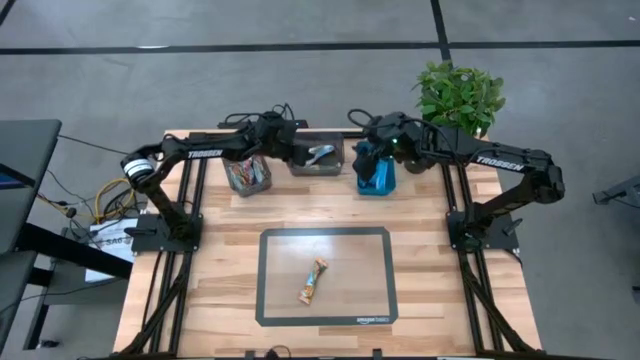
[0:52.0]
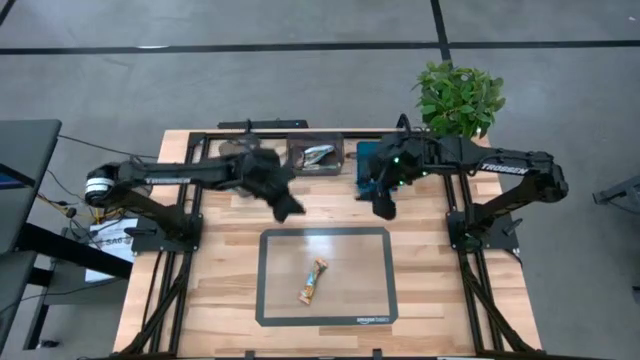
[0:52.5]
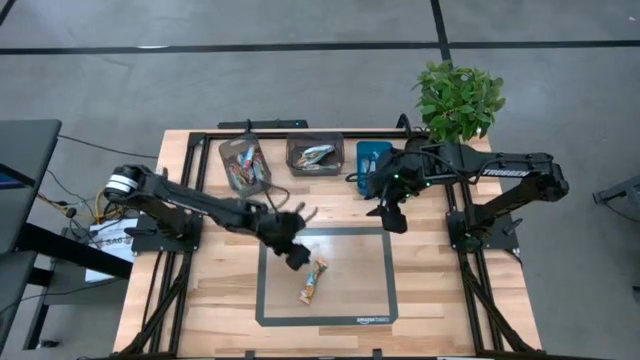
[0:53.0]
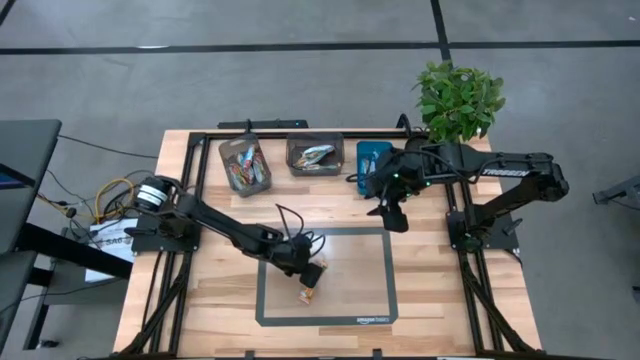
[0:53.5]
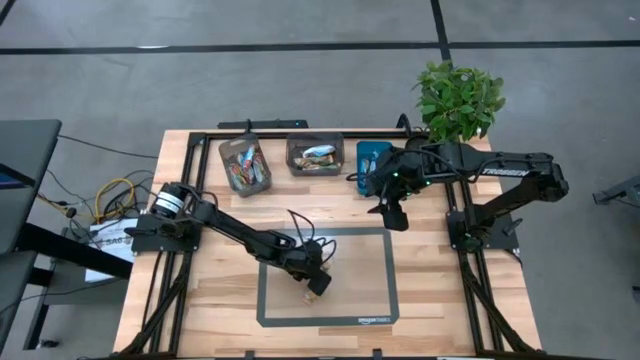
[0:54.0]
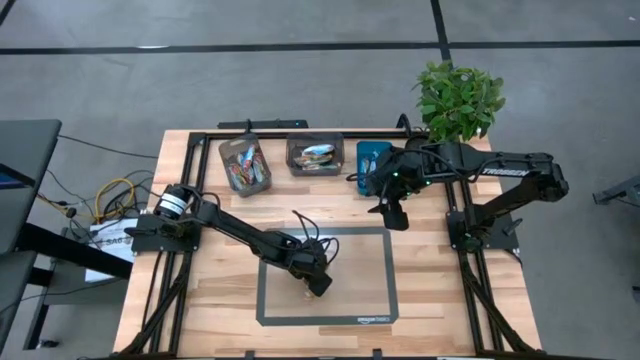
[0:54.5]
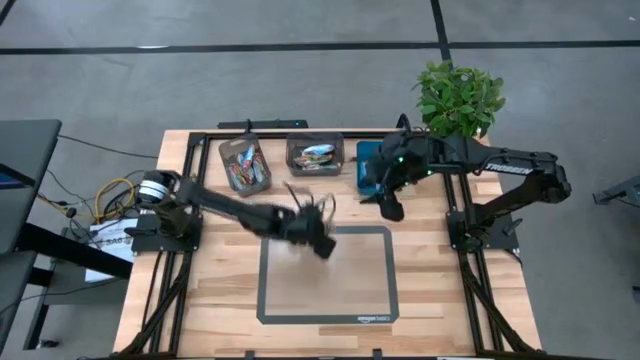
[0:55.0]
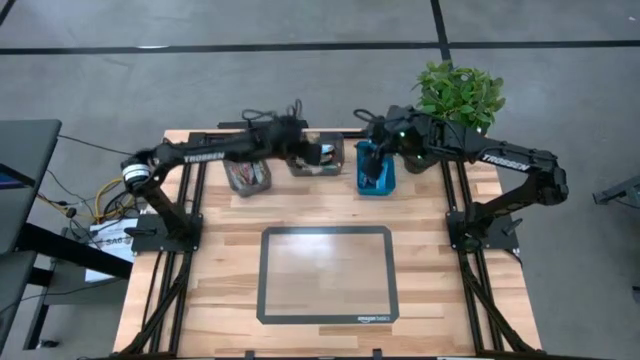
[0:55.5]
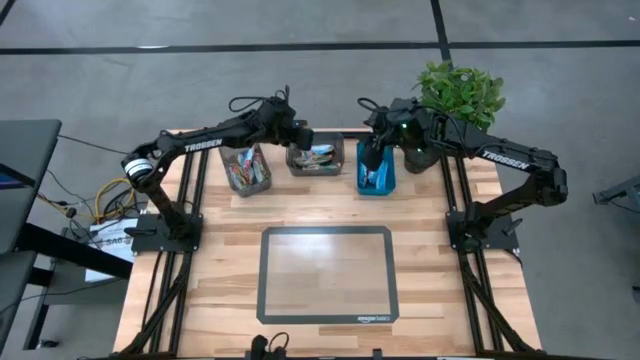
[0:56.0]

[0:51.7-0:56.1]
Task: Pick and place Granola Bars by type
Put the yellow granola bar into the right black bin

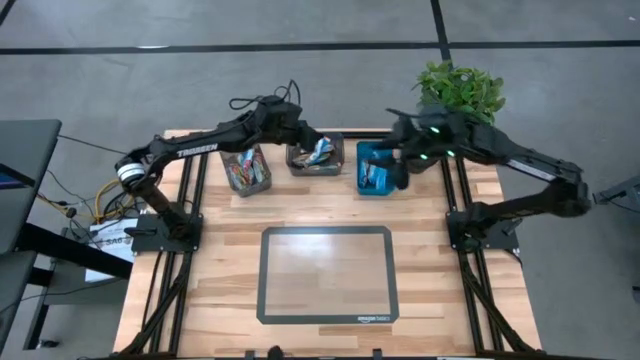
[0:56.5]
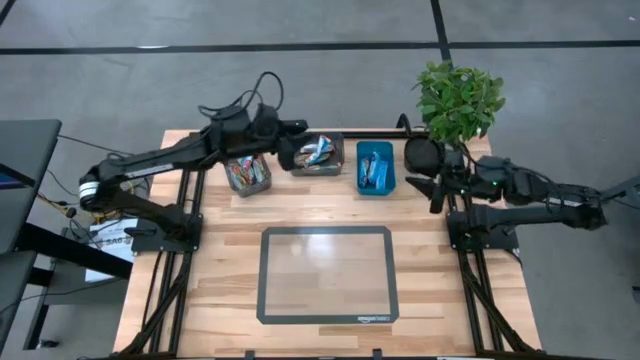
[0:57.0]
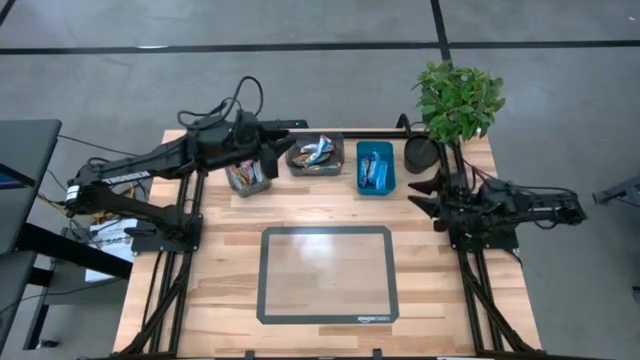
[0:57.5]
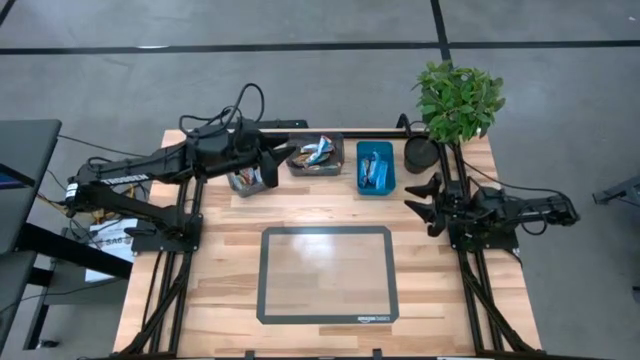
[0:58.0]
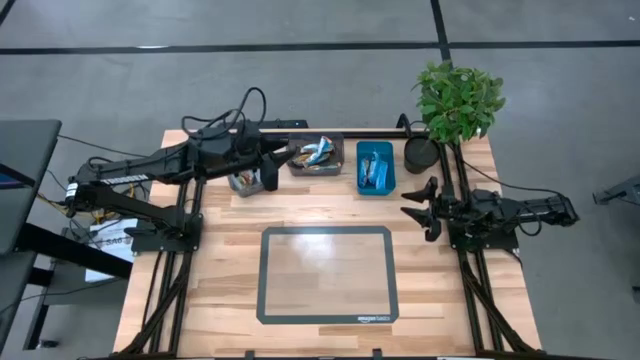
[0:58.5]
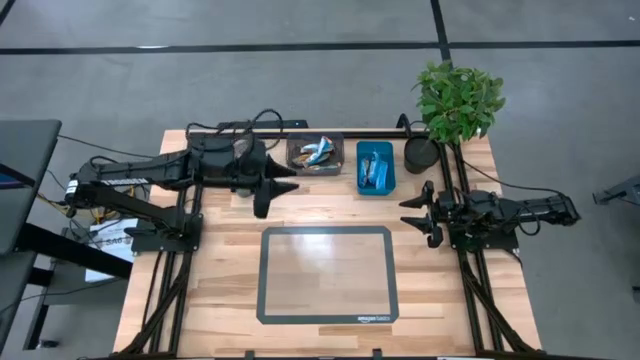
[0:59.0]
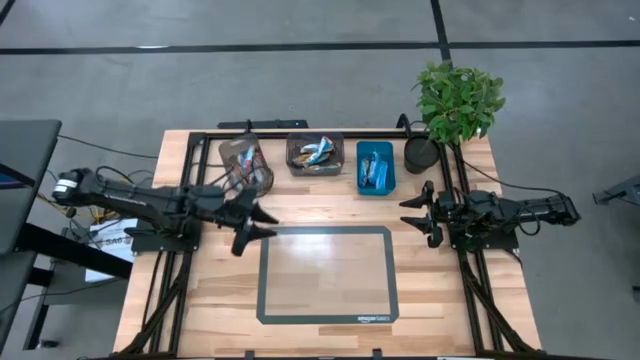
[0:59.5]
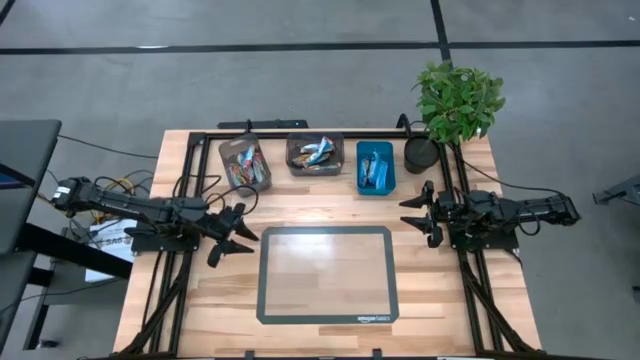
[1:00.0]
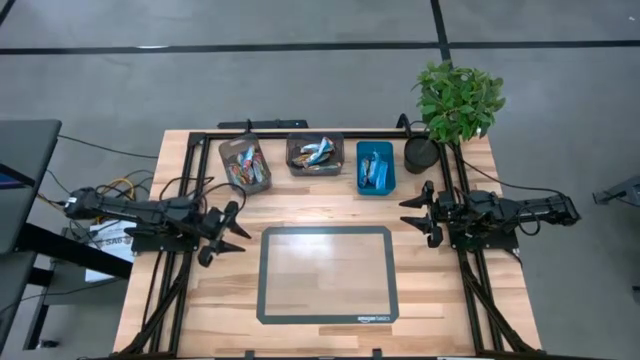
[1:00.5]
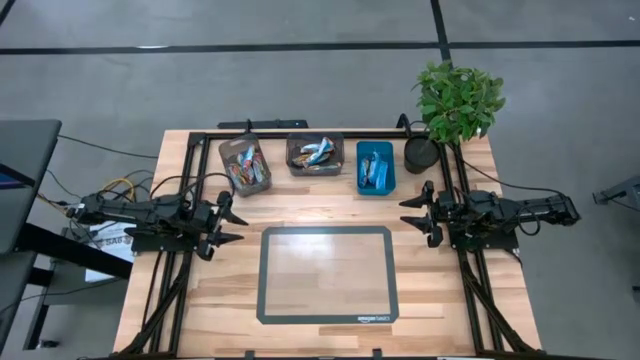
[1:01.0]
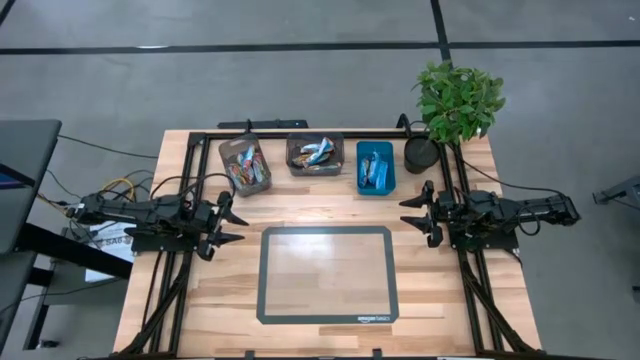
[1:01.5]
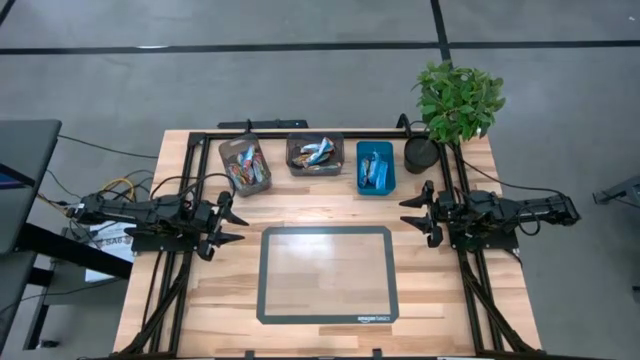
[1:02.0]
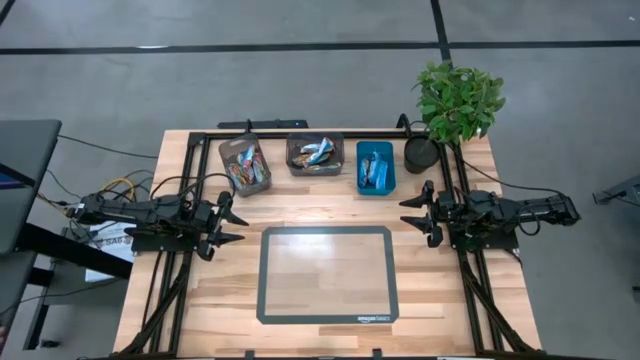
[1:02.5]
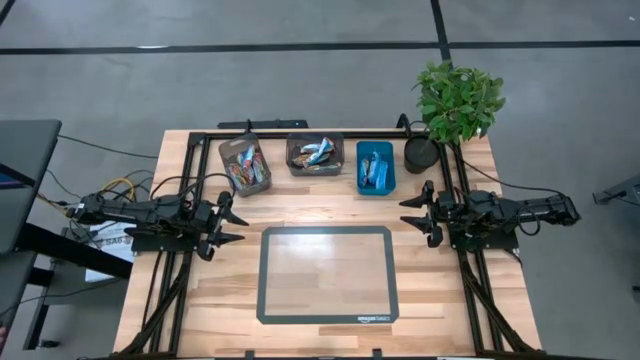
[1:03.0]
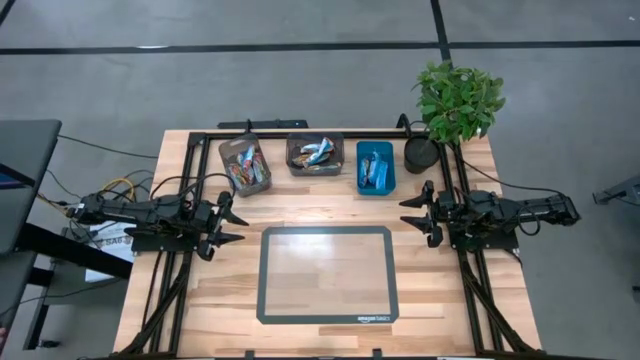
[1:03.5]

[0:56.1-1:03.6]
Return to Home Position

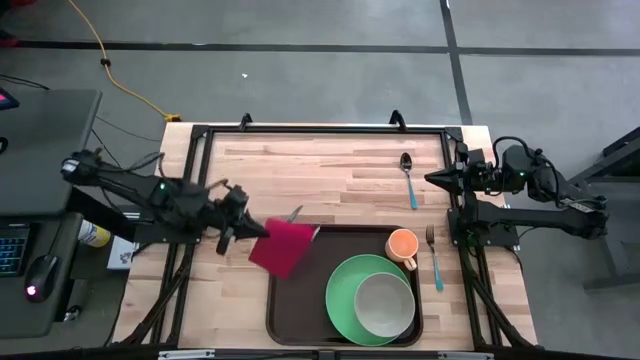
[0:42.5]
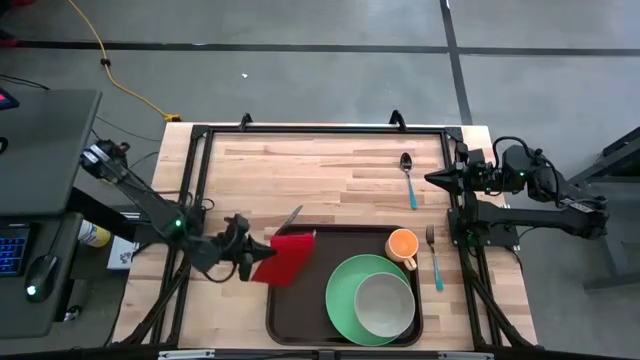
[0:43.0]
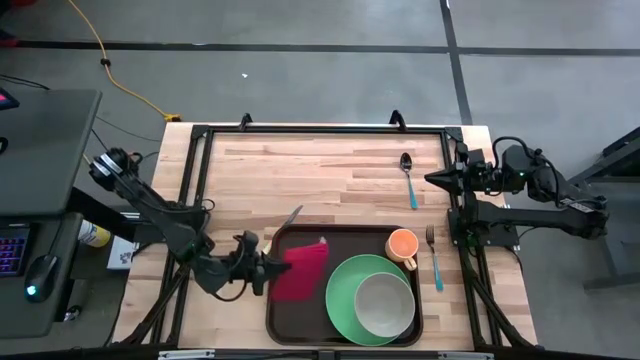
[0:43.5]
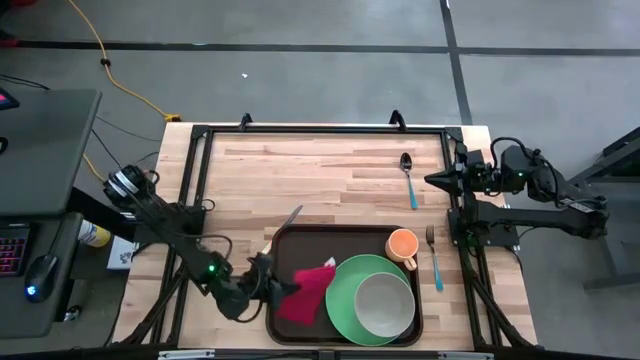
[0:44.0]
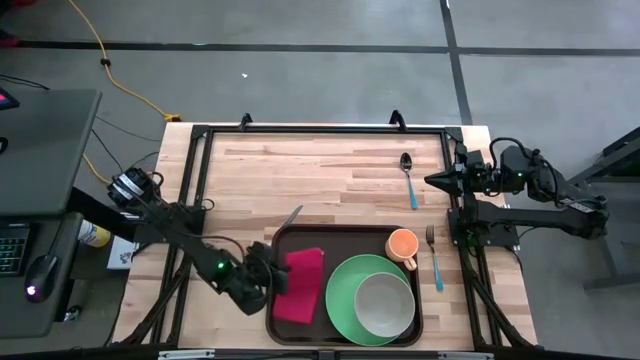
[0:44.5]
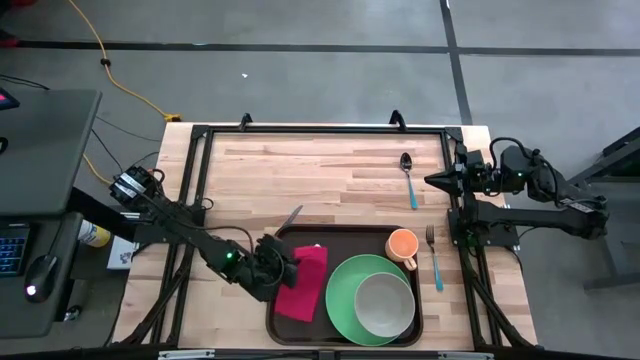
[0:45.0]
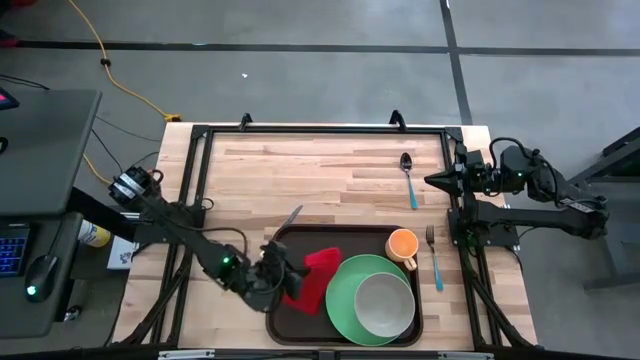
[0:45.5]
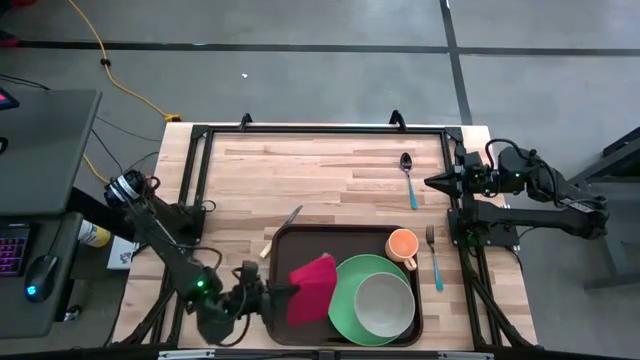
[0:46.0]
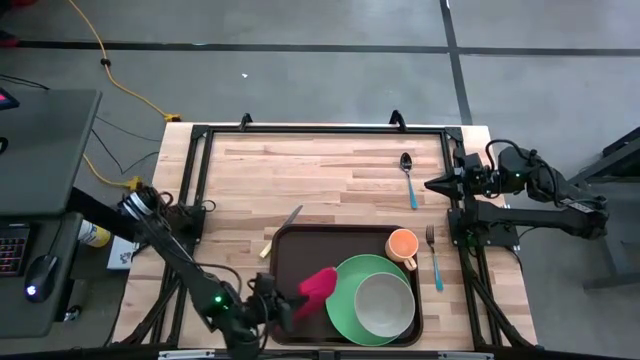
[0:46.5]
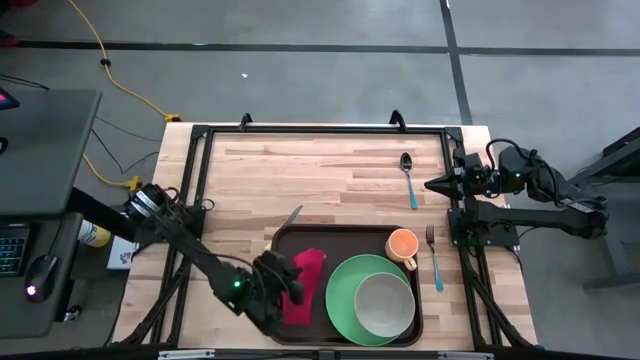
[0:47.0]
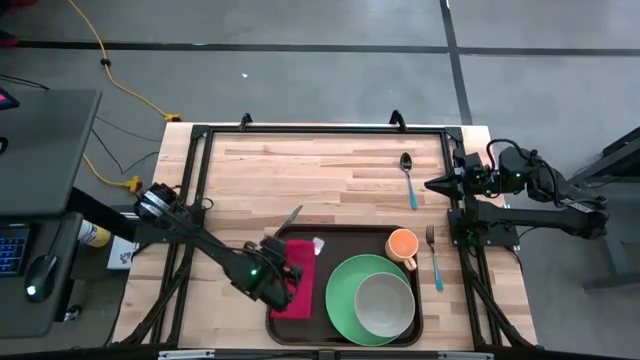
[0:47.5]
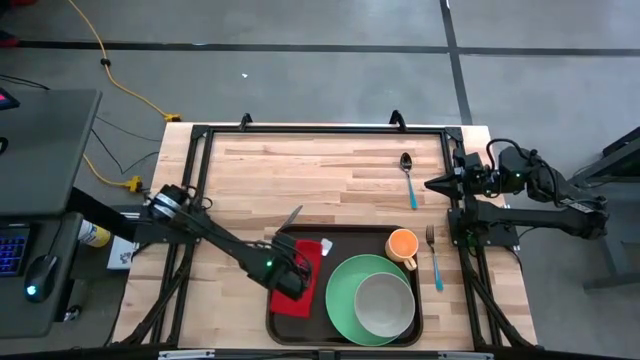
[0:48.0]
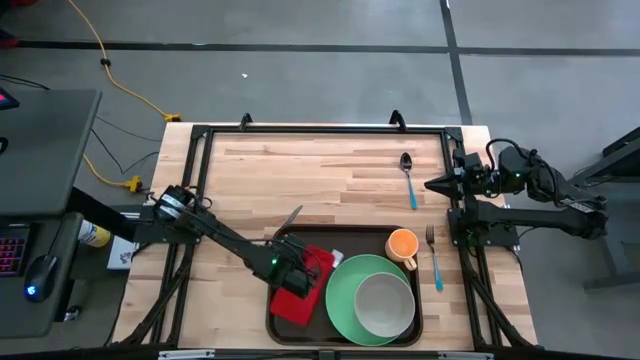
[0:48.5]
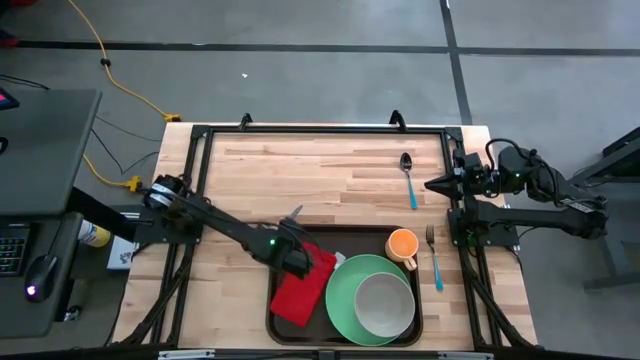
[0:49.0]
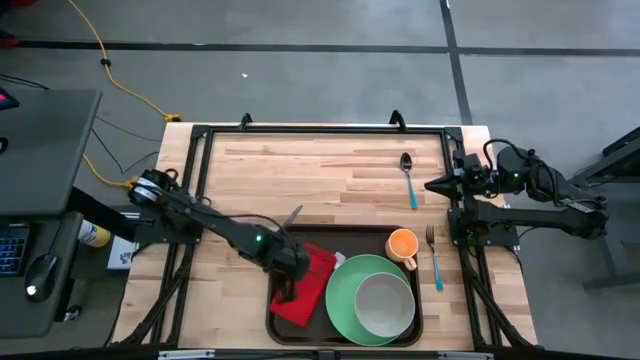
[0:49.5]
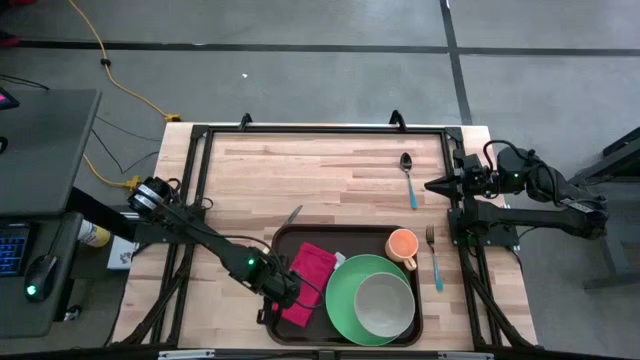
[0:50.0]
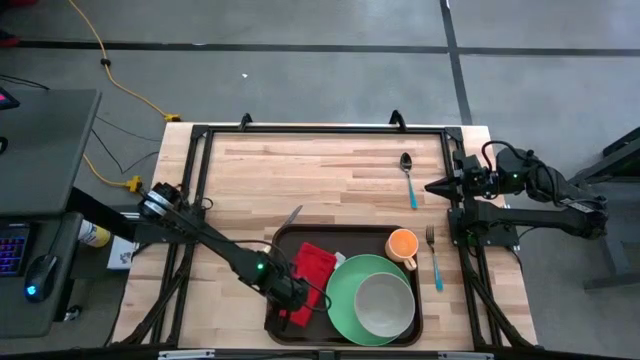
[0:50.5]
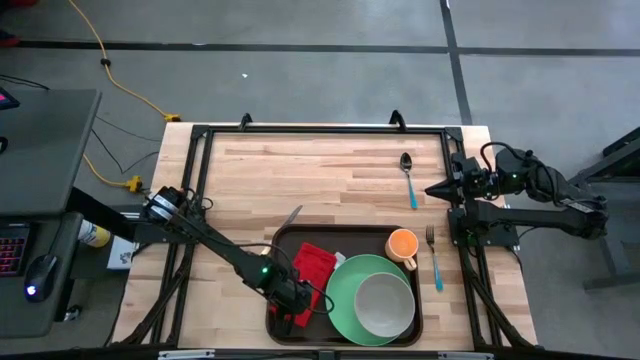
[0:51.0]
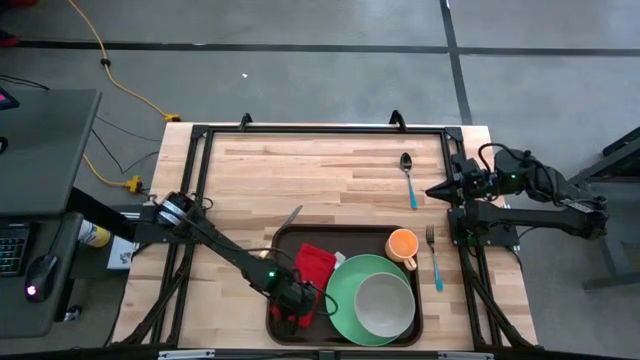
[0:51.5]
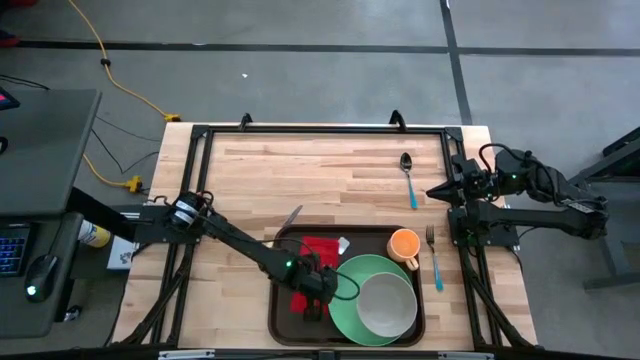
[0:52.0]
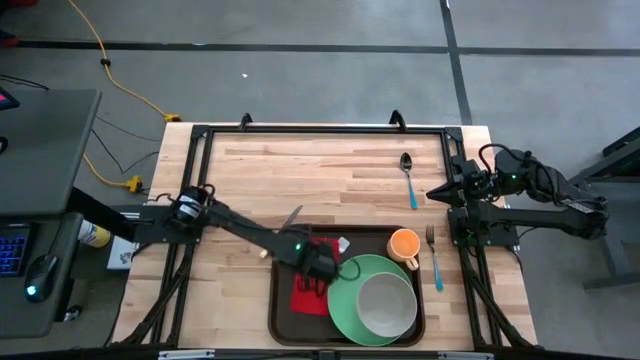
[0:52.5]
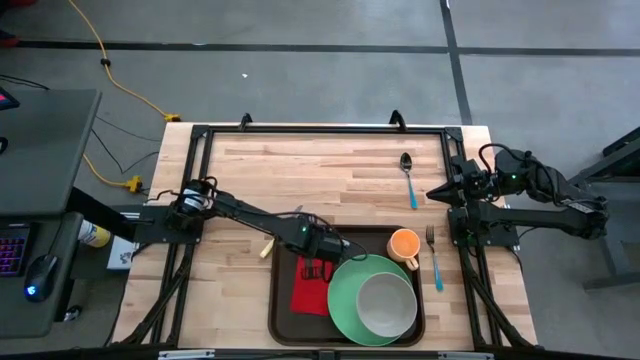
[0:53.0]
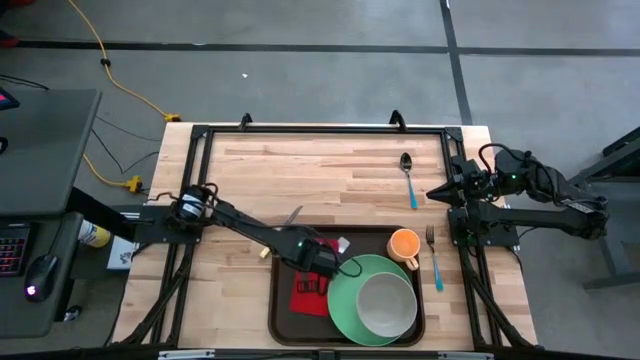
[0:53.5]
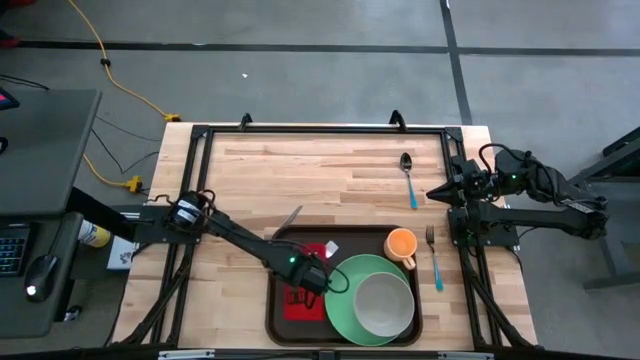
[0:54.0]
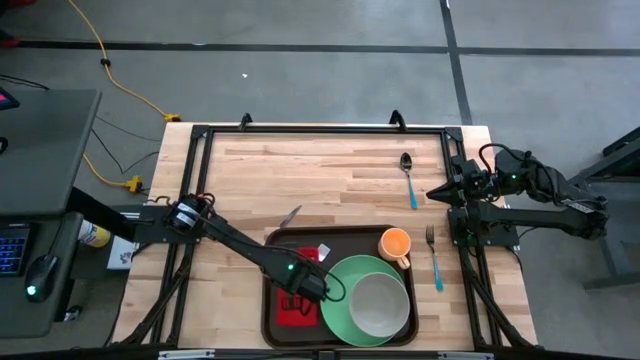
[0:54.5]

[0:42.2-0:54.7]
Task: Set up tray
Put the red napkin on the black serving tray to the left side of the green plate
